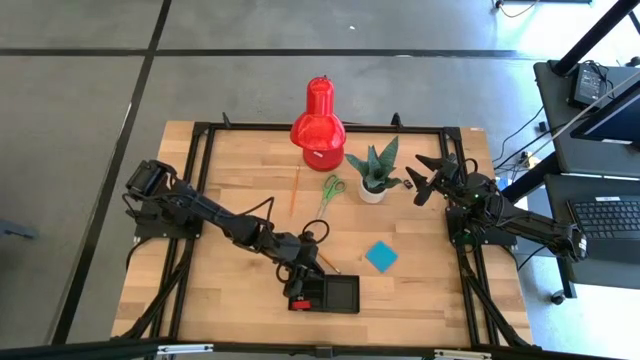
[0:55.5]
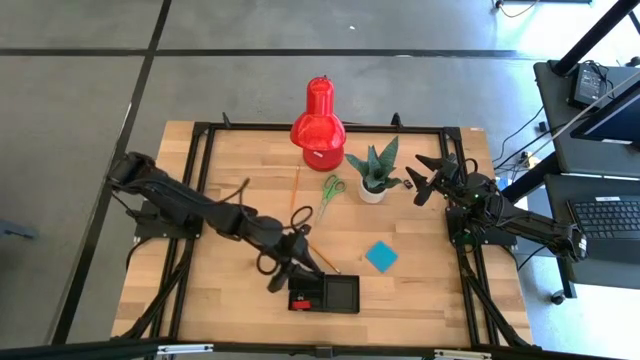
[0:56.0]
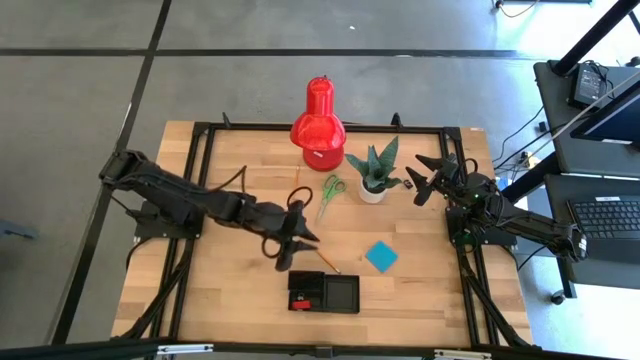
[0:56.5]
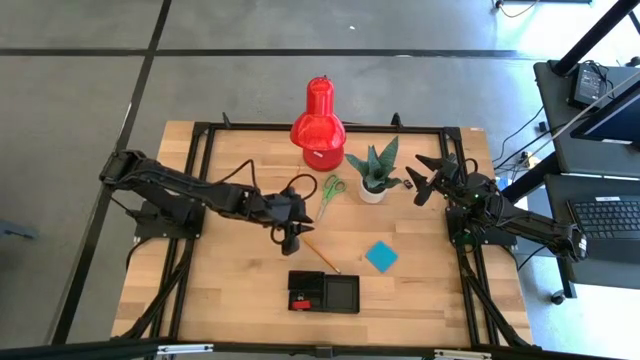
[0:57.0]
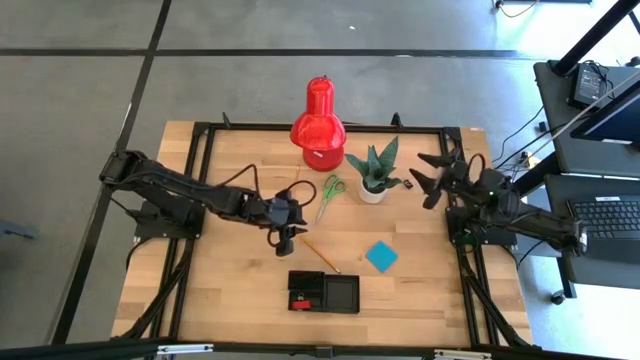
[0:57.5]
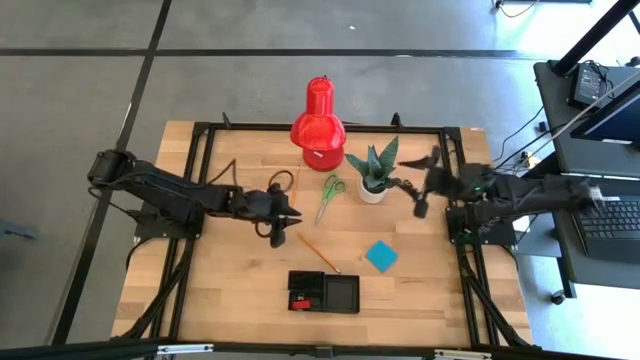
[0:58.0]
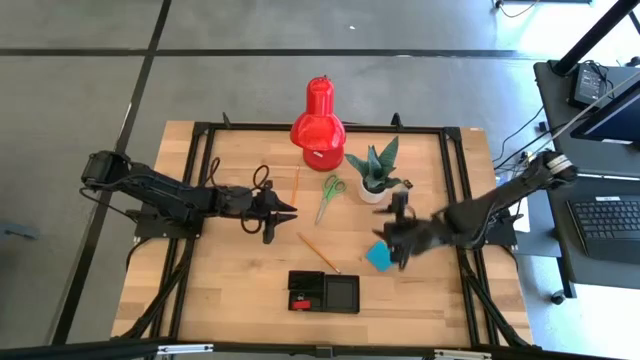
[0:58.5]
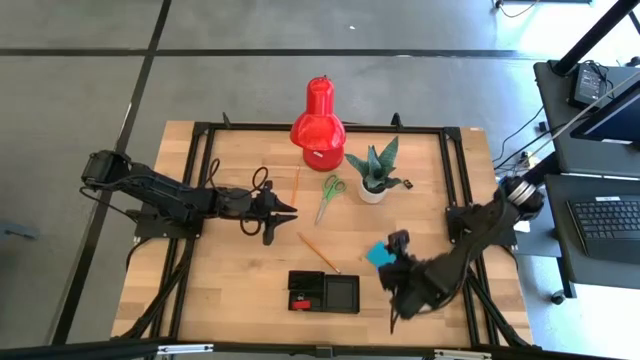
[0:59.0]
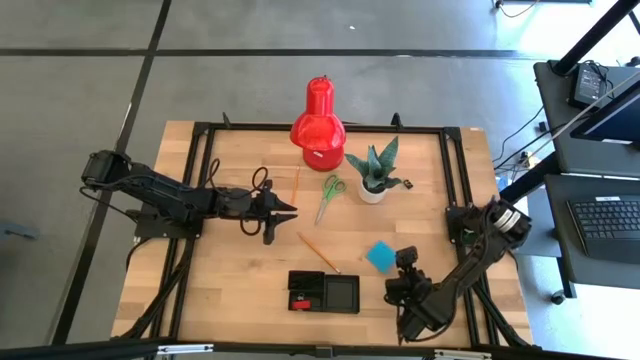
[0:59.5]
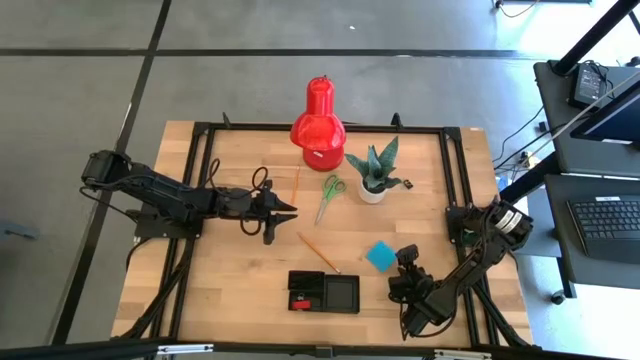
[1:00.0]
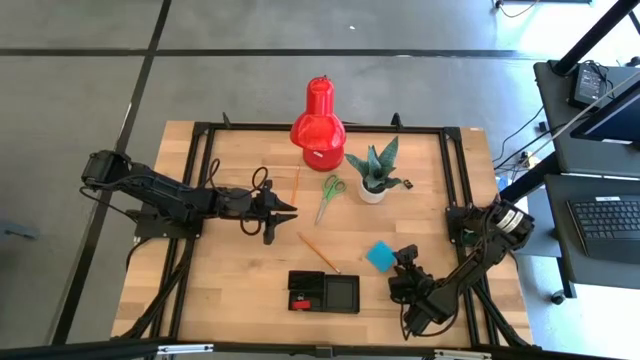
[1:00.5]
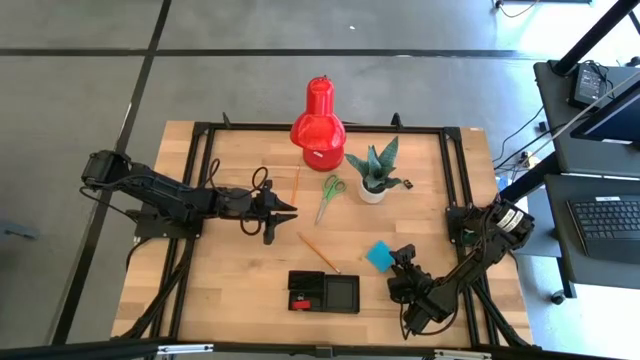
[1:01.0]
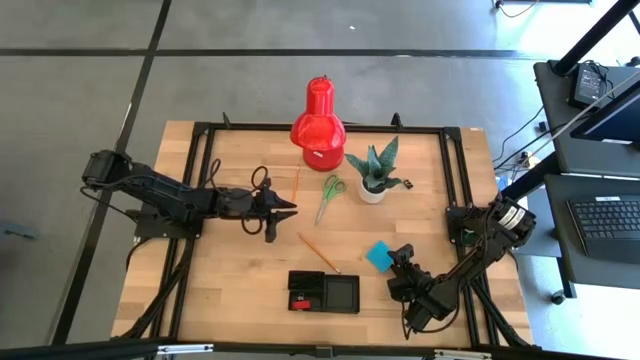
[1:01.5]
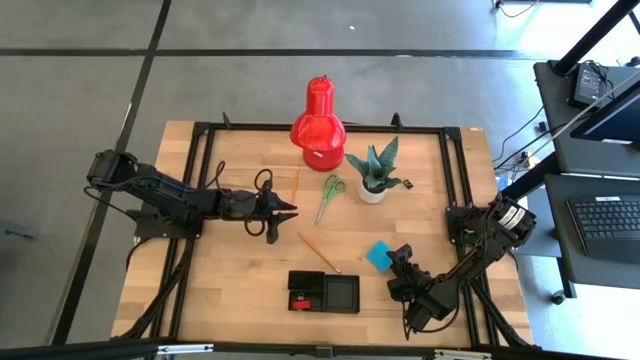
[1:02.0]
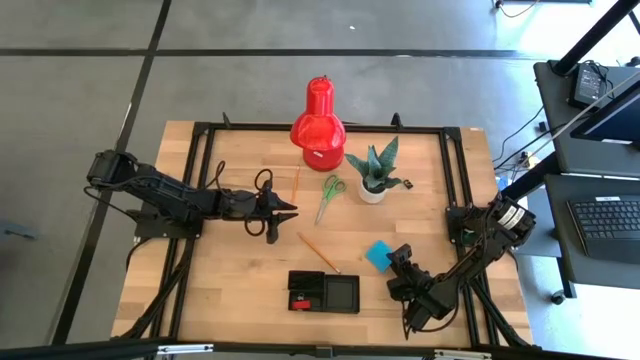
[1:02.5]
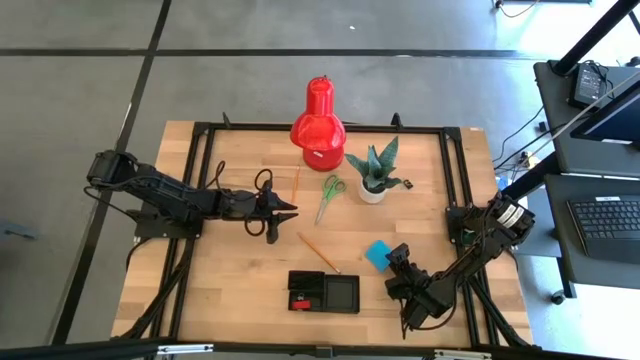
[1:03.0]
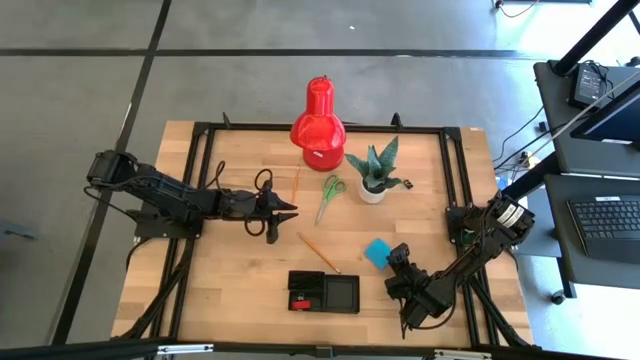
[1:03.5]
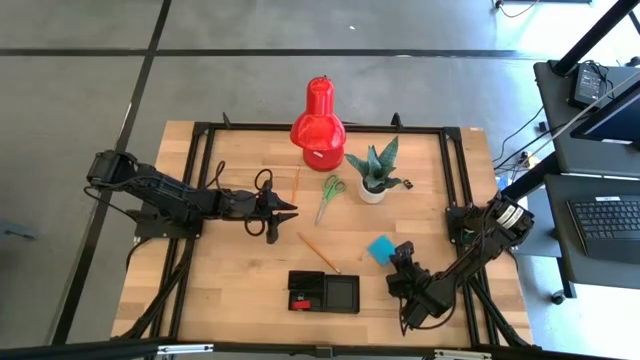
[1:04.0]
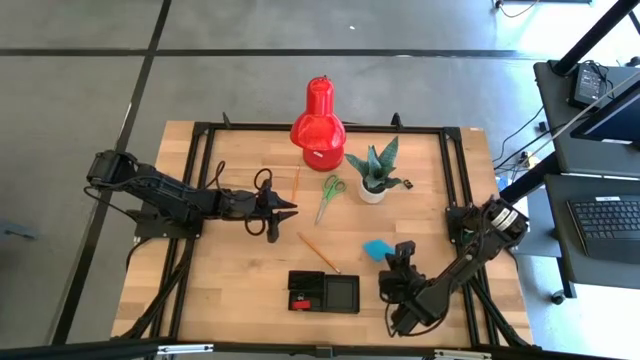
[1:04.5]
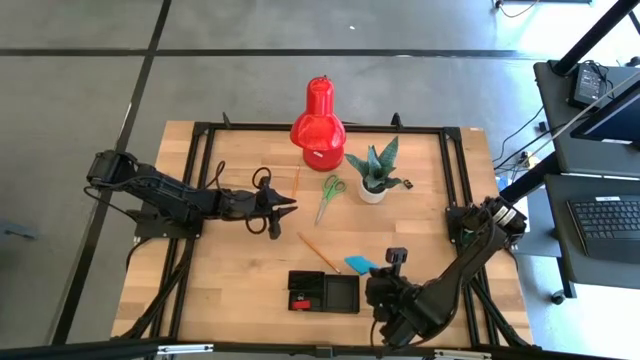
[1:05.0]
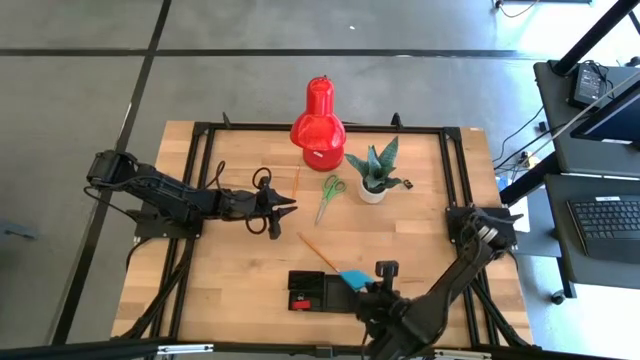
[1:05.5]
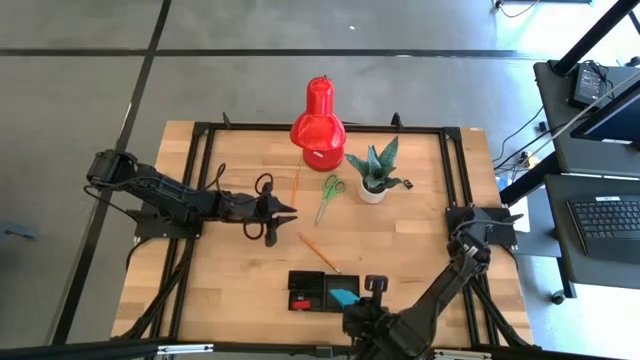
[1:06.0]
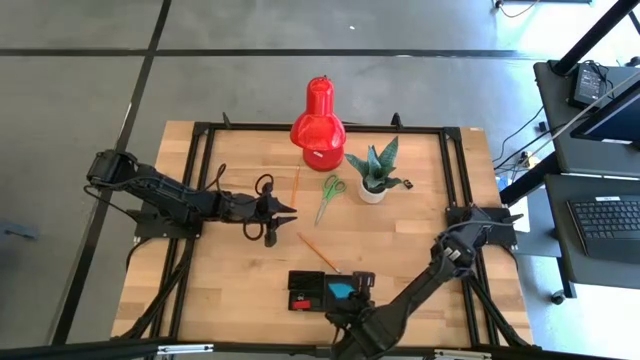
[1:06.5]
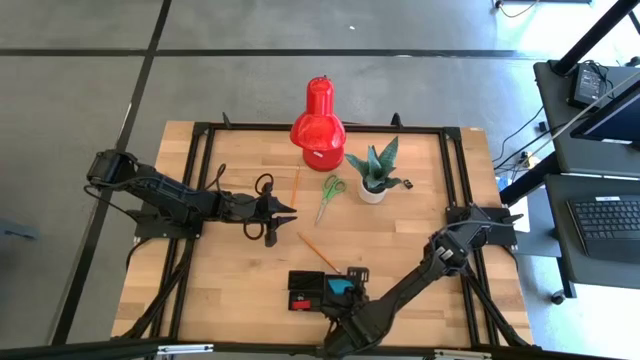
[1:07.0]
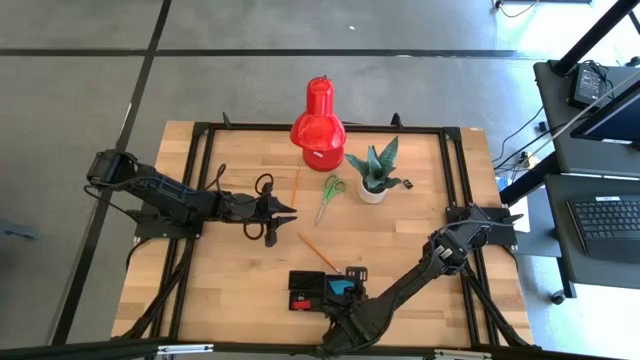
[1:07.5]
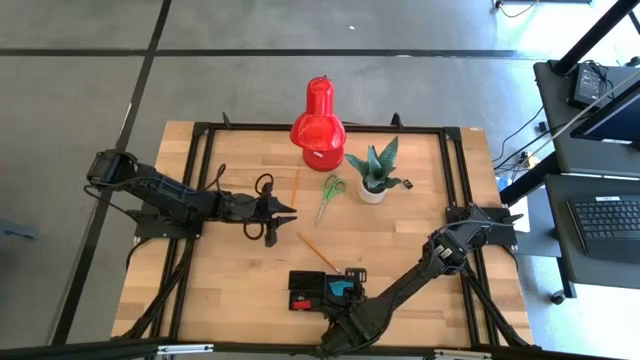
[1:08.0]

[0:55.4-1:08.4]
Task: Pick and place office supplies into organizer
Put the blue sticky note pad into the desk organizer

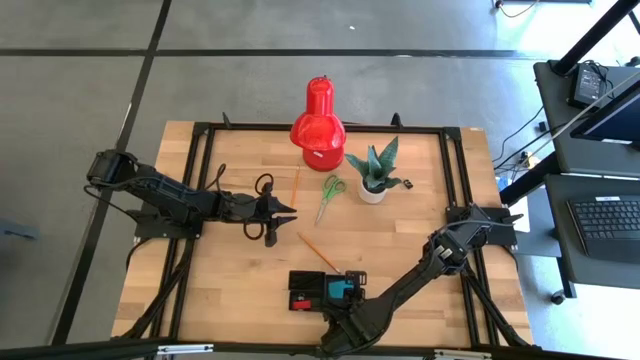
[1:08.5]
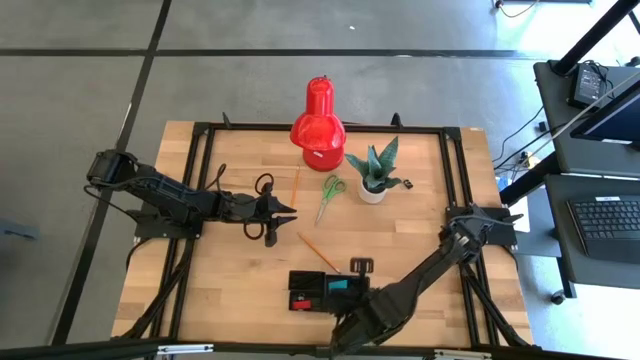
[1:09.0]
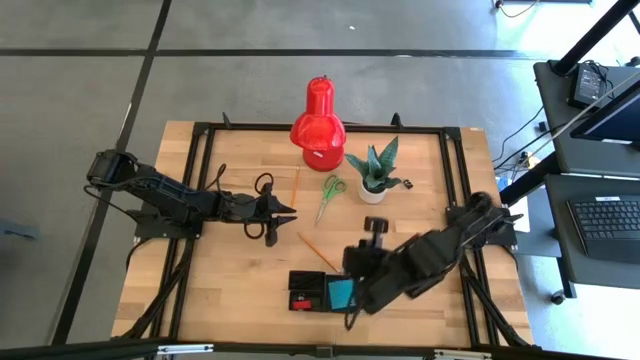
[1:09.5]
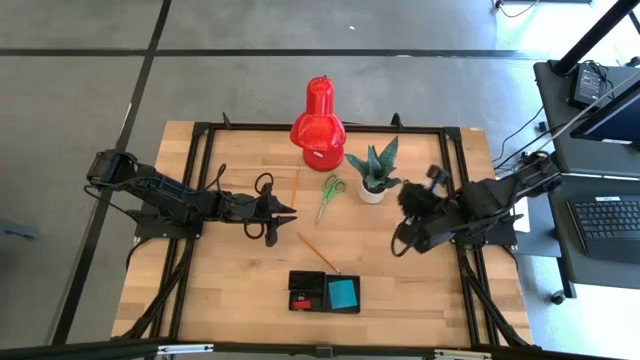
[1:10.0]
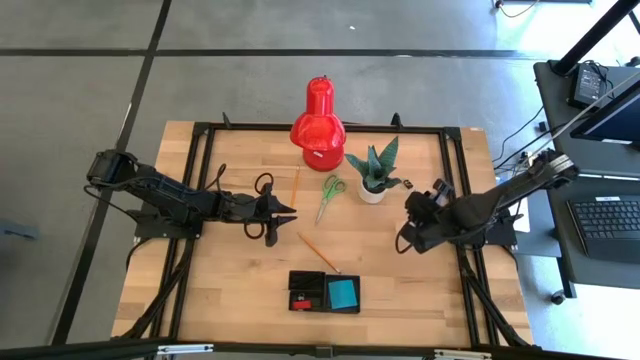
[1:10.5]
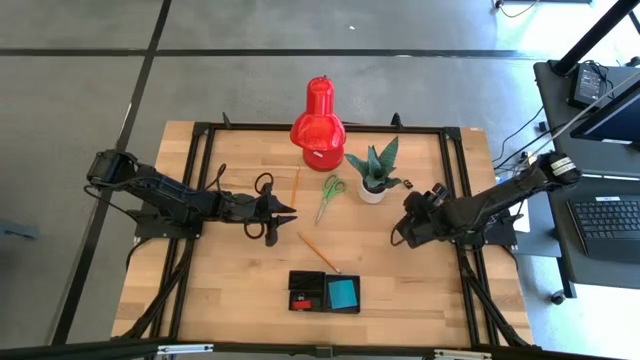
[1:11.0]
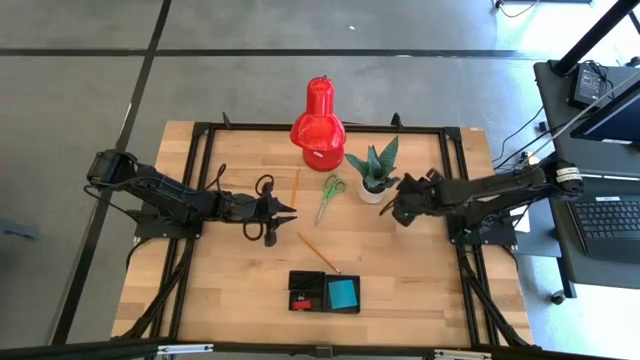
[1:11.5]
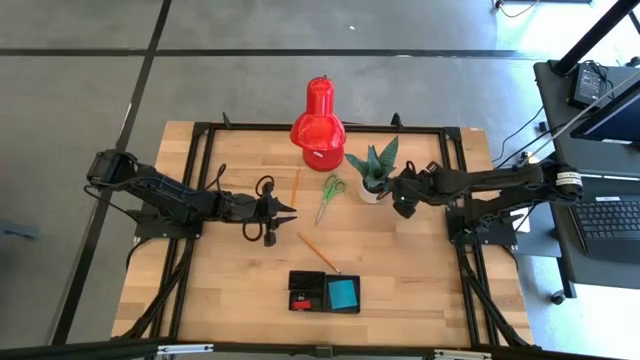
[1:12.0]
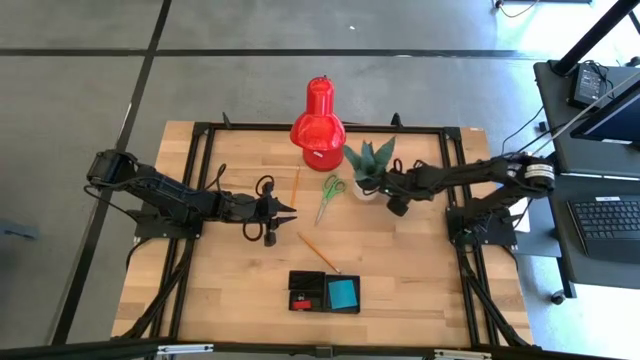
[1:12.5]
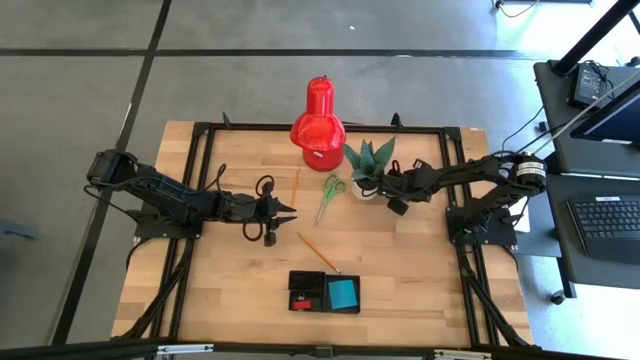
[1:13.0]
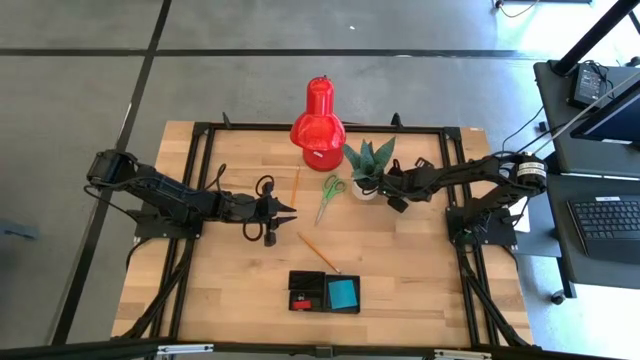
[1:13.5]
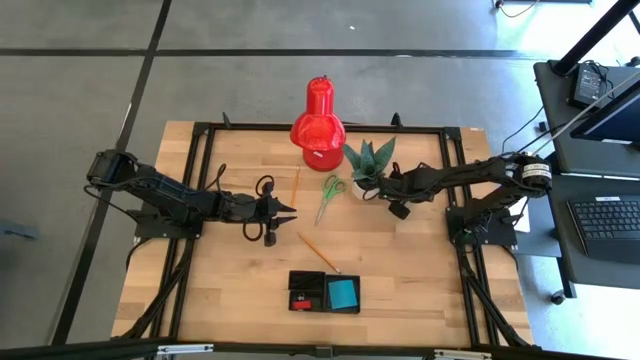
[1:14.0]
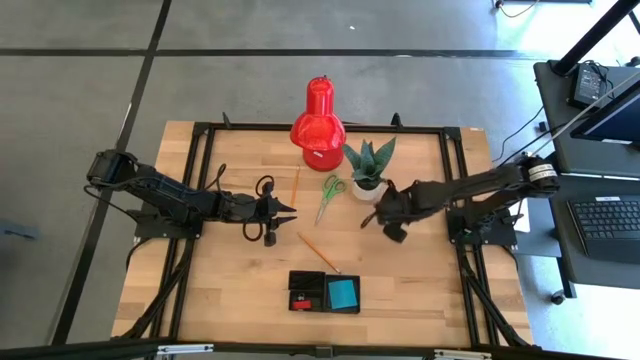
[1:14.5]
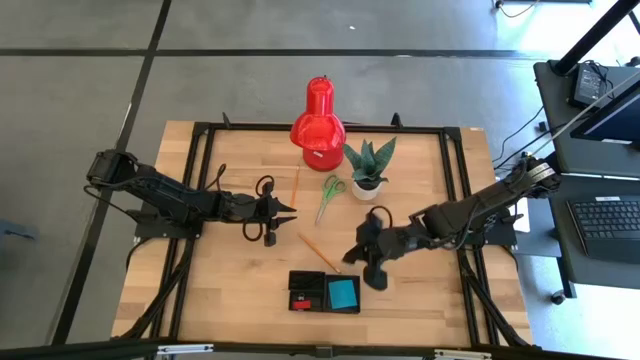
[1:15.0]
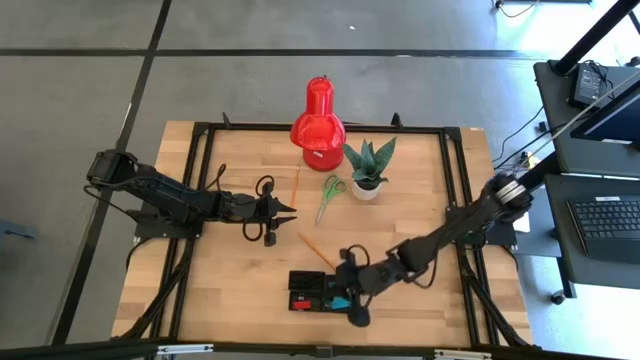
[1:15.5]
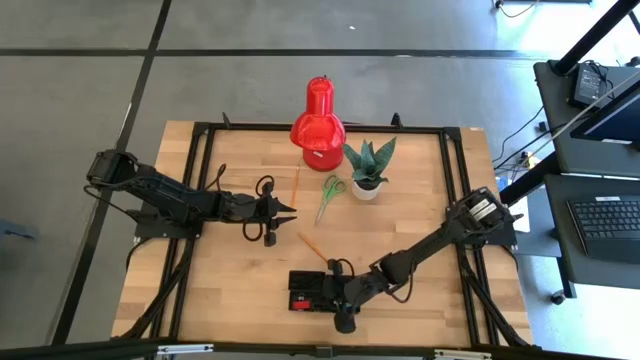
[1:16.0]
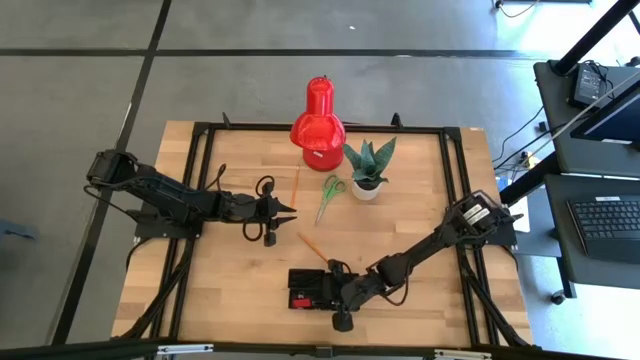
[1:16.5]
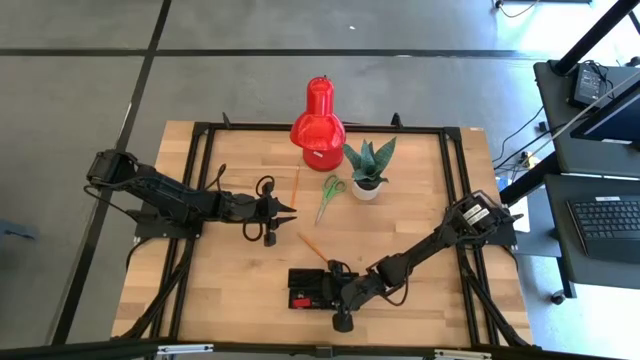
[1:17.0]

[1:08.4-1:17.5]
Put the black binder clip into the desk organizer
